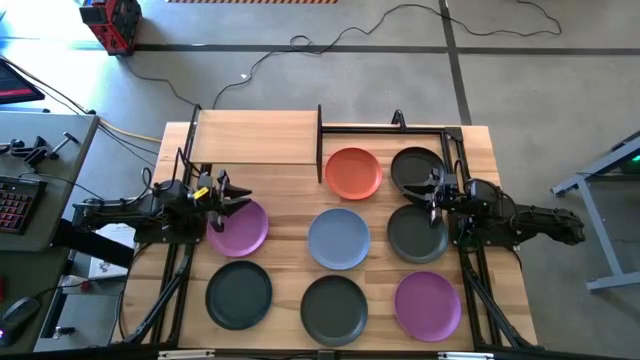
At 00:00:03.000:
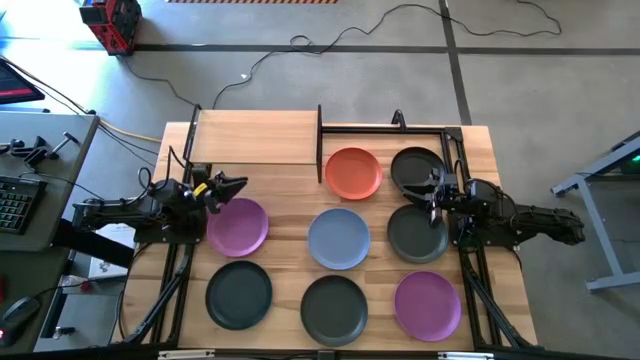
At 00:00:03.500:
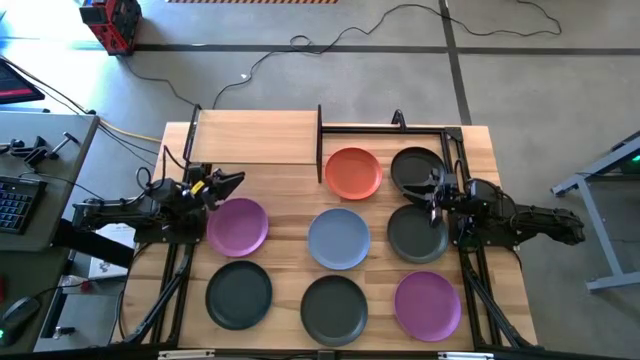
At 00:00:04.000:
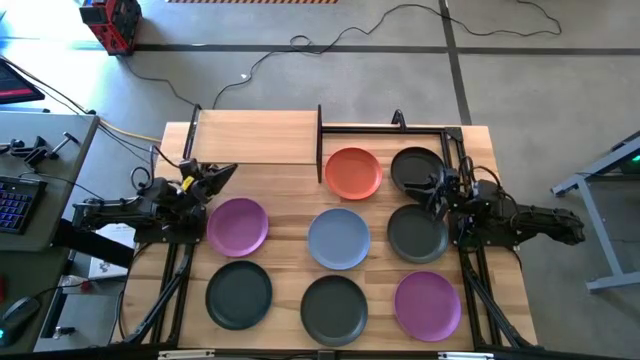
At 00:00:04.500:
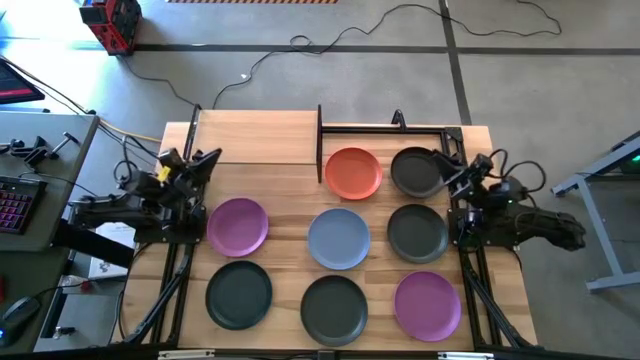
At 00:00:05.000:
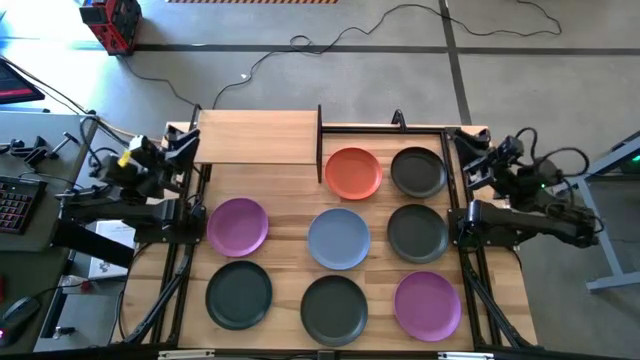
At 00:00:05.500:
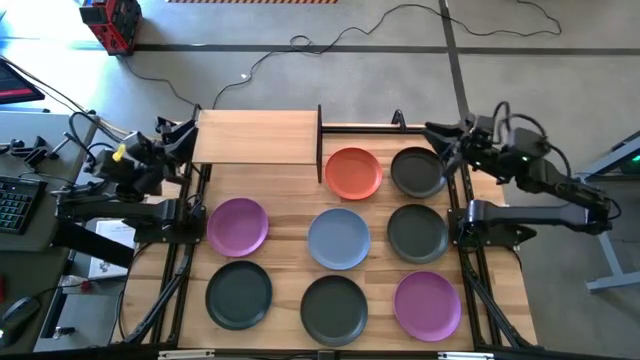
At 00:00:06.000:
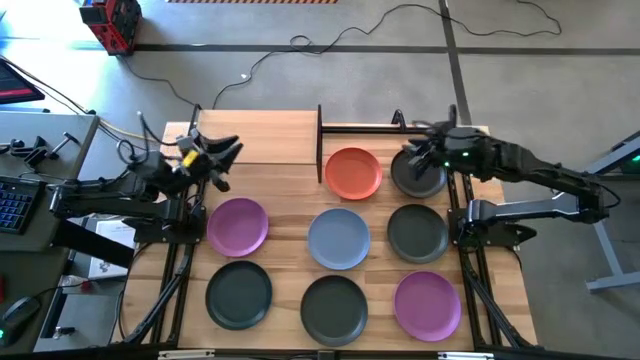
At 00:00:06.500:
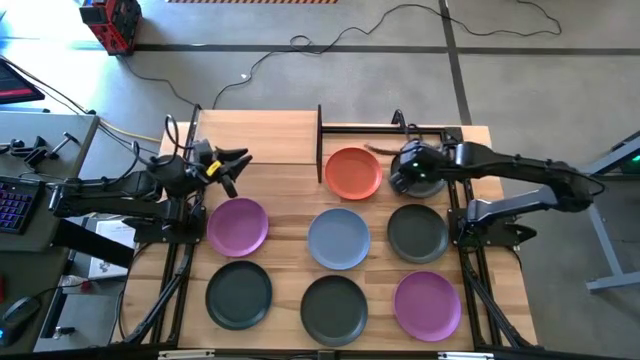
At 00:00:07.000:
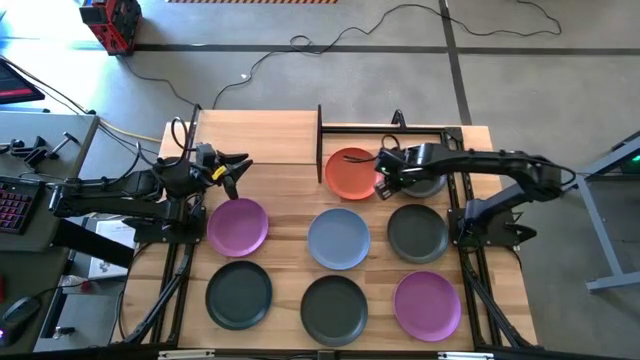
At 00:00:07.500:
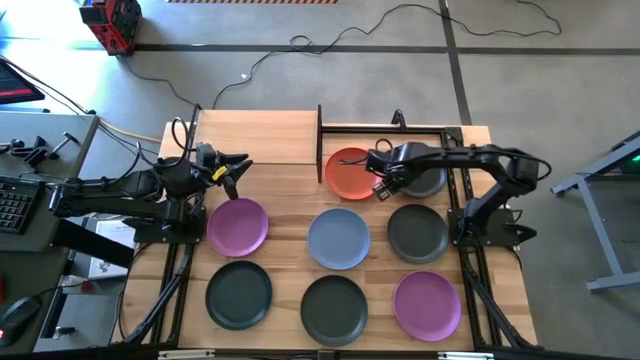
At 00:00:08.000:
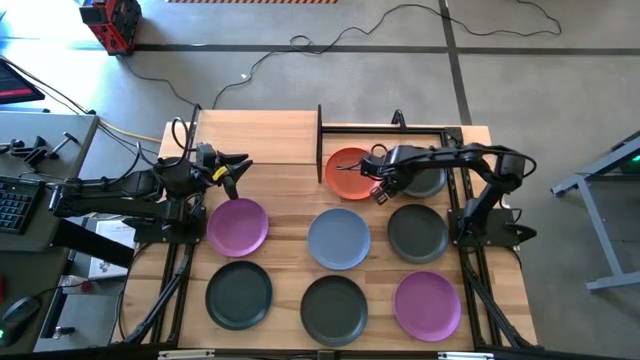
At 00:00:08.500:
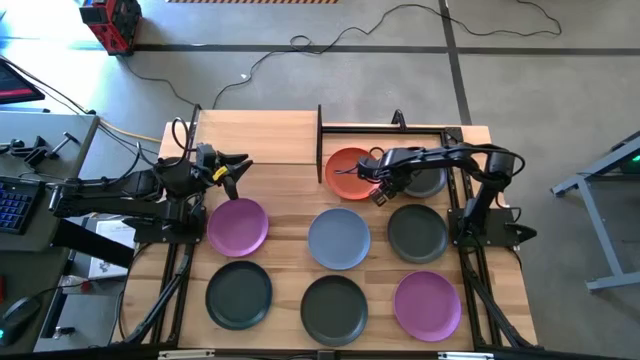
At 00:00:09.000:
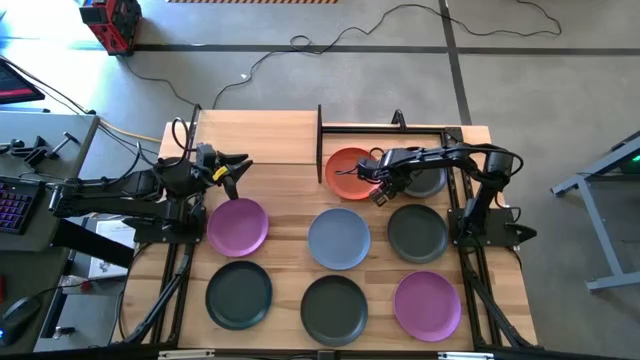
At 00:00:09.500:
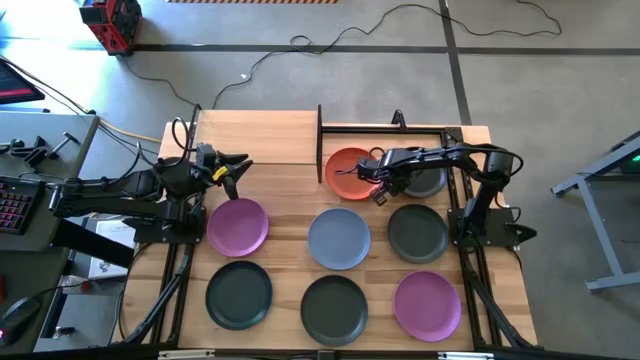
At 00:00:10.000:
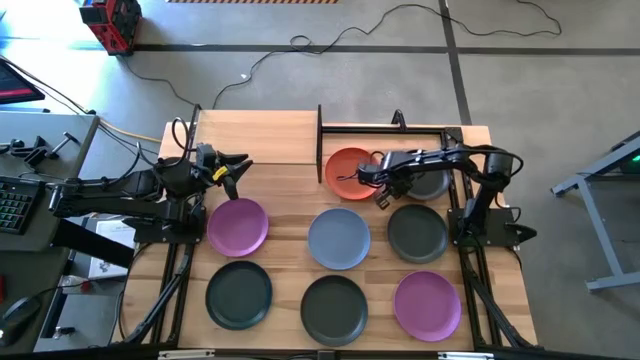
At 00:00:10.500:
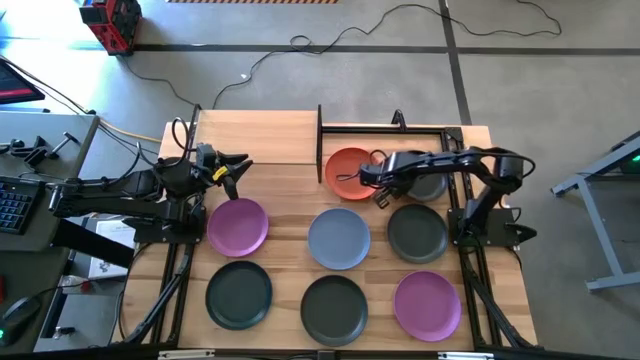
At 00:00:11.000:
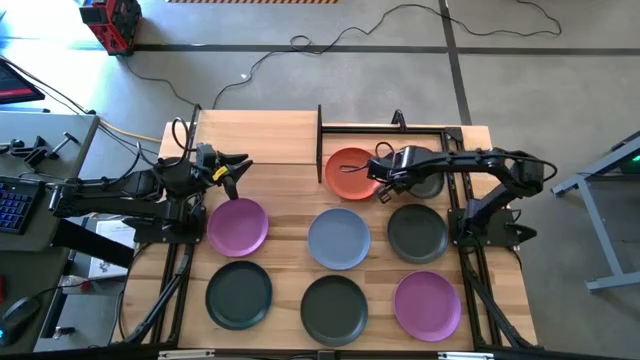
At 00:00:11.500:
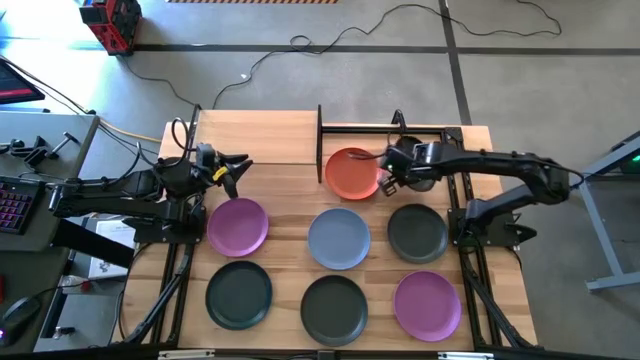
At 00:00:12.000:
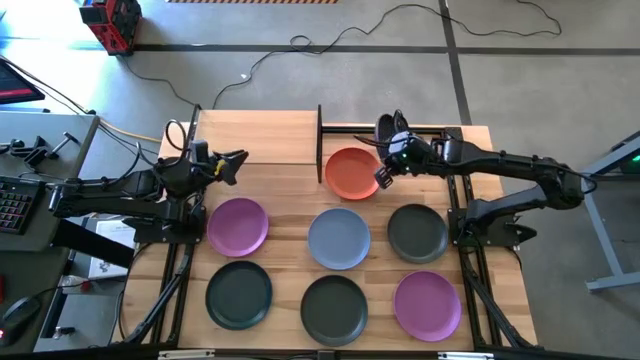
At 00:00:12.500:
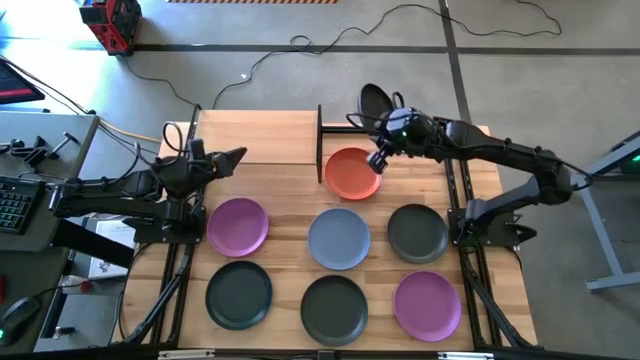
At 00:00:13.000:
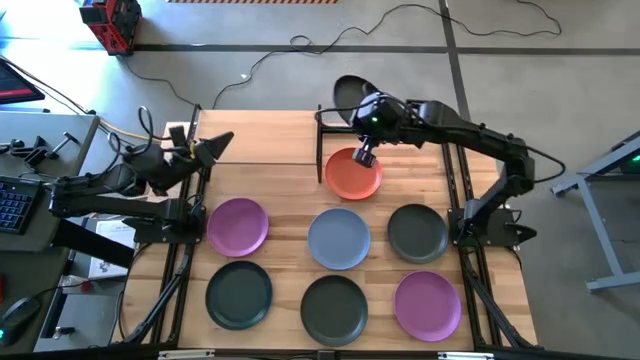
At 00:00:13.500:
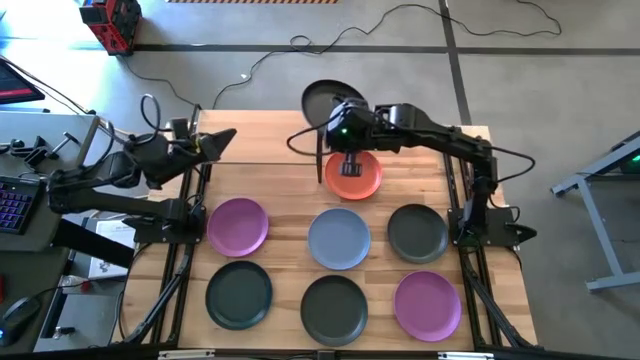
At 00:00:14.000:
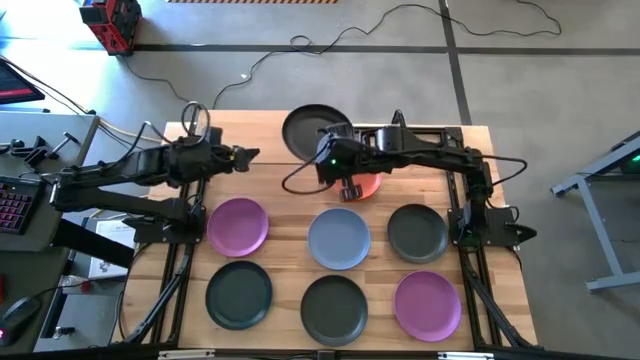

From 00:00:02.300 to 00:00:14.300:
Task: Place and stack plates onto a shelf
Put the top right black plate on the shelf

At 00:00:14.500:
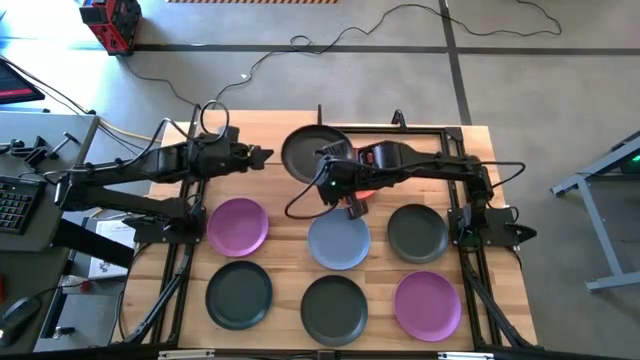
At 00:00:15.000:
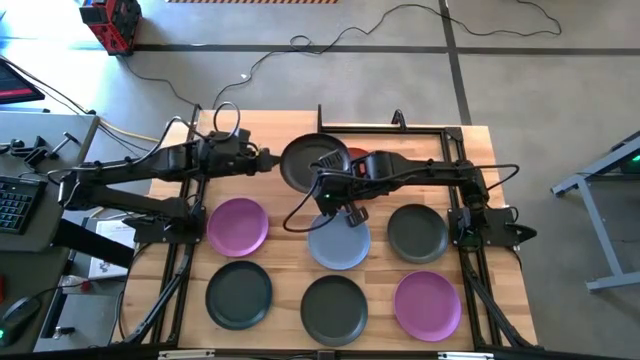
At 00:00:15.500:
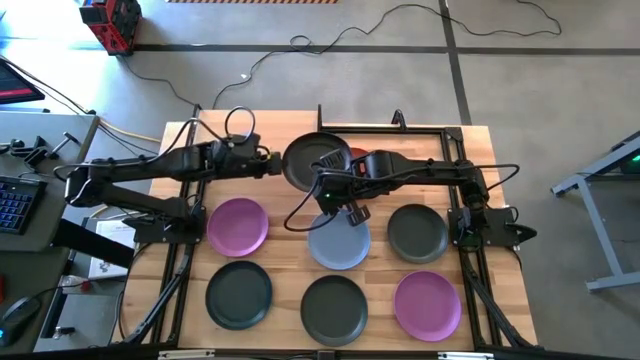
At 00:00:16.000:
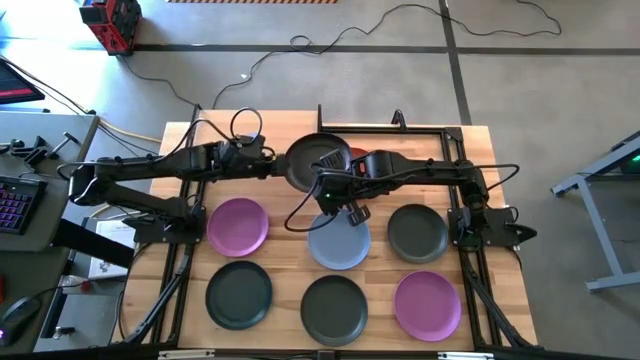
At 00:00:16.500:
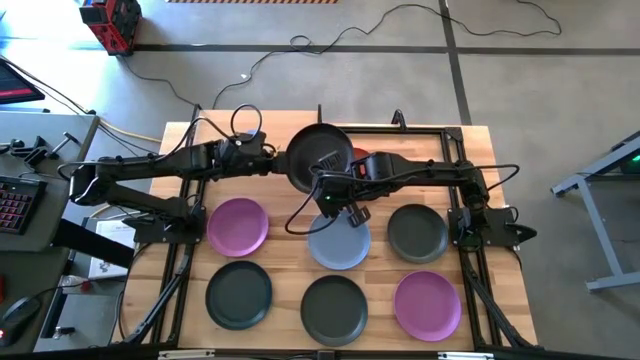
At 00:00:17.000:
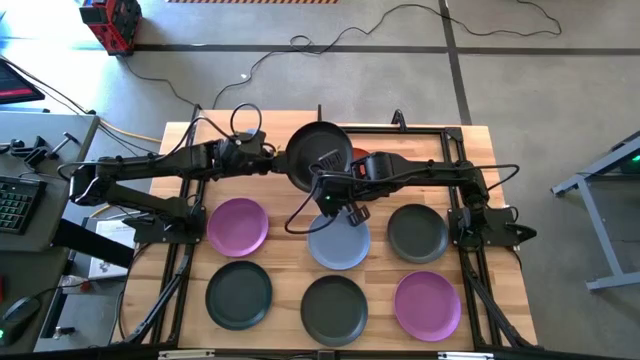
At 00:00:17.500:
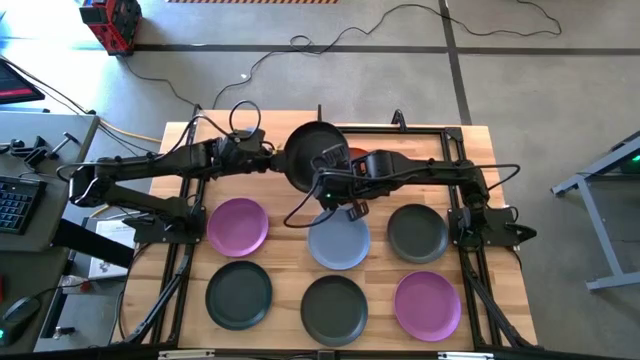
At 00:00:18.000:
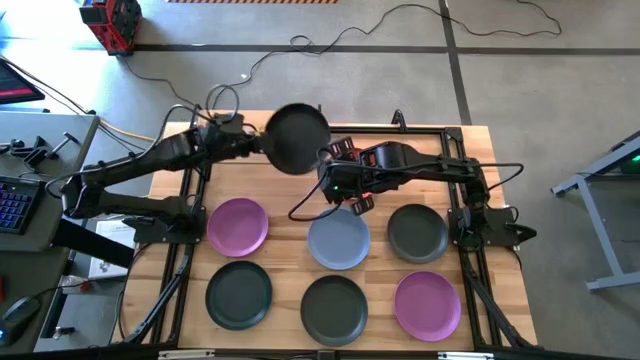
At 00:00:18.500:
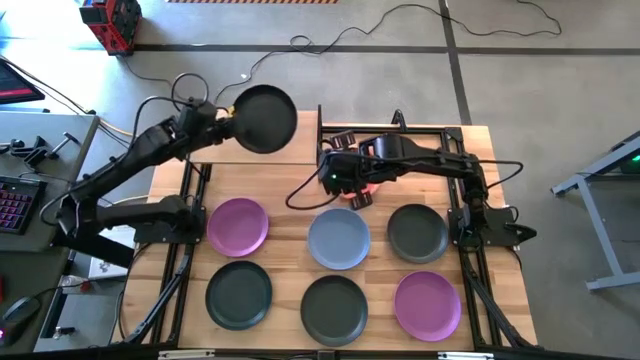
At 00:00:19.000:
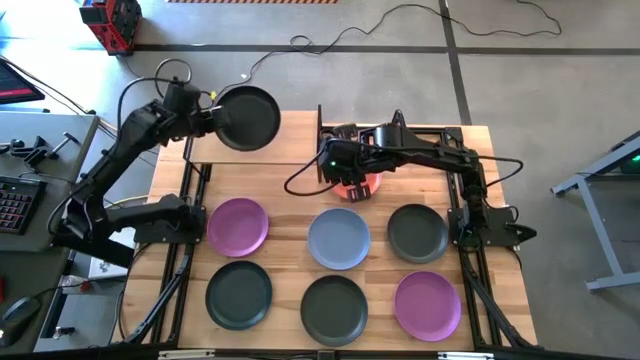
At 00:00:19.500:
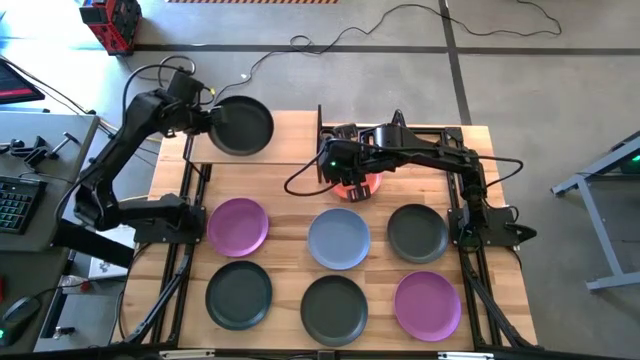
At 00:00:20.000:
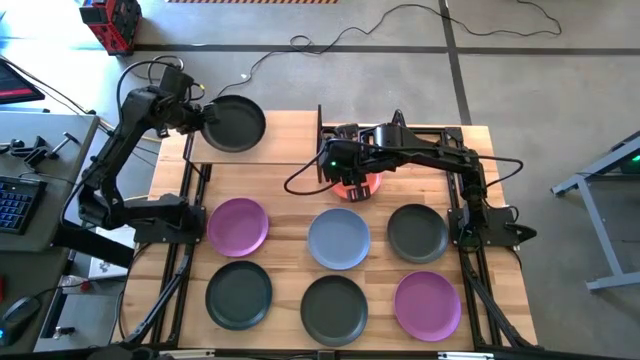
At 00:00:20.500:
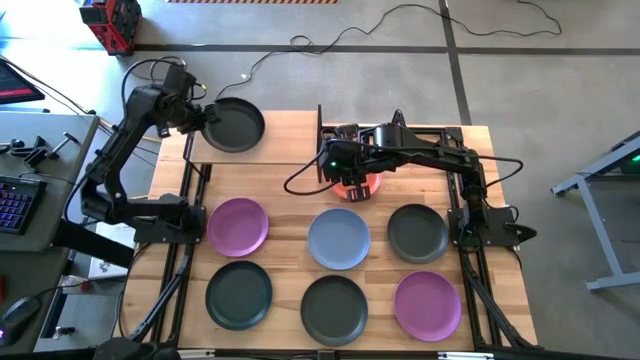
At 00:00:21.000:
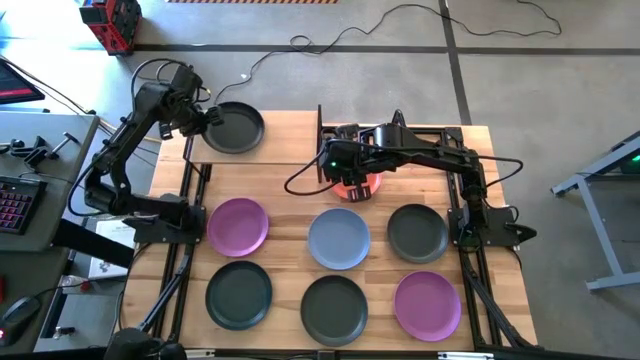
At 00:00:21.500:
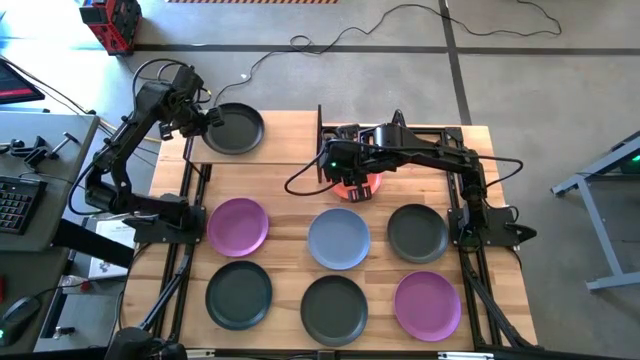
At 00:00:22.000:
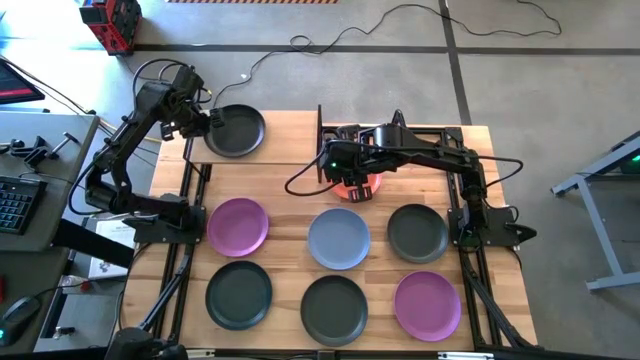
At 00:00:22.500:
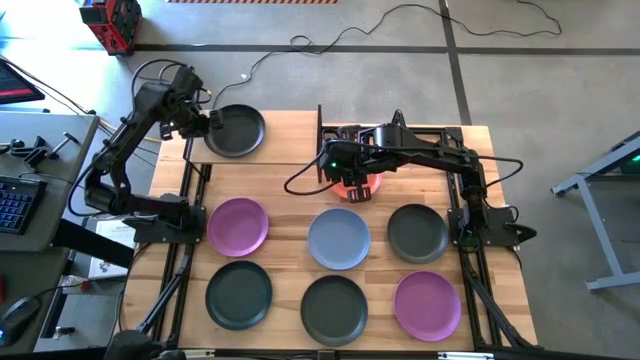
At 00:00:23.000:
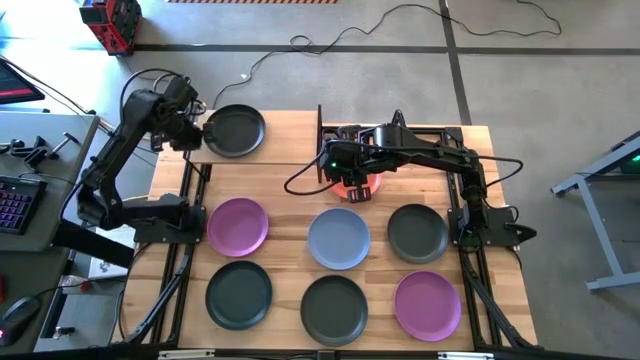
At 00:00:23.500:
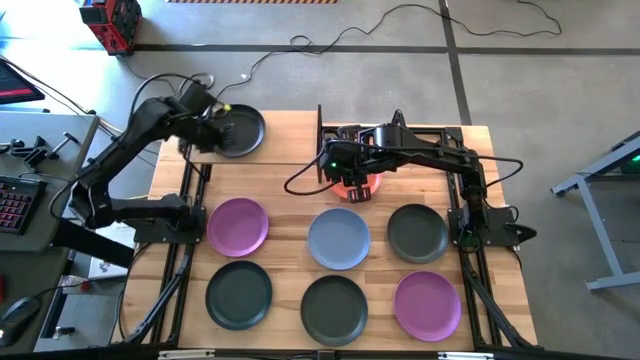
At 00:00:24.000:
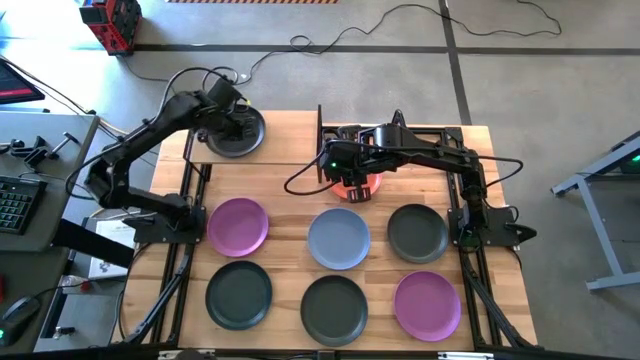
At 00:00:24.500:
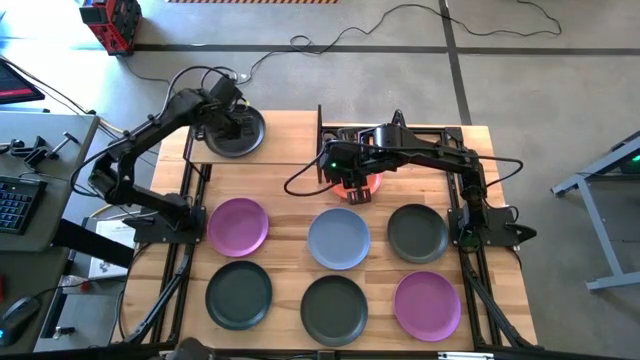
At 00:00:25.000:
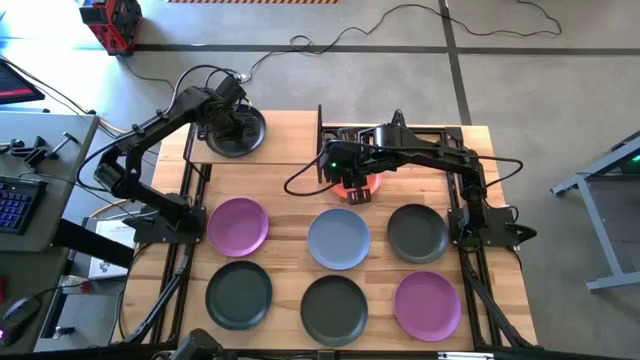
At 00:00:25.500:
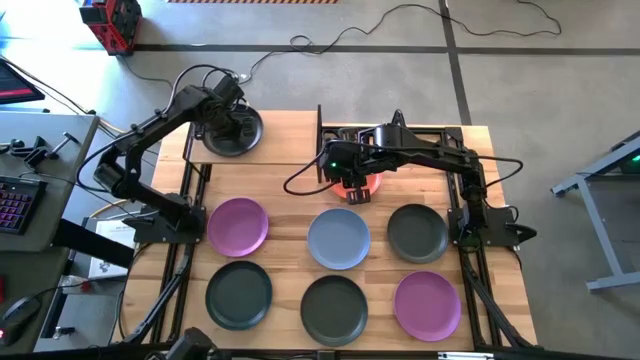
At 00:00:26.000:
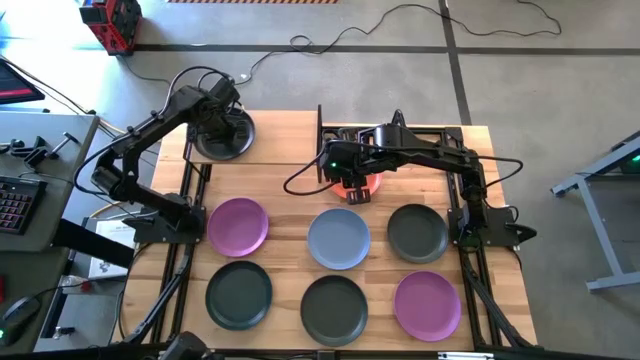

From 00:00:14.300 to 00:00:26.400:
Put the top right black plate on the shelf
